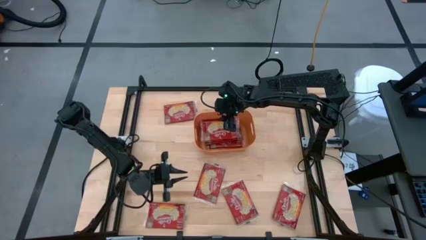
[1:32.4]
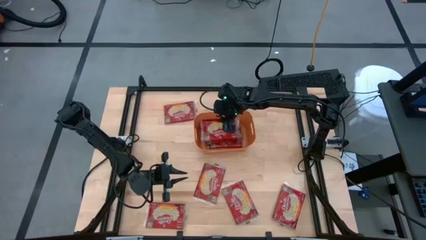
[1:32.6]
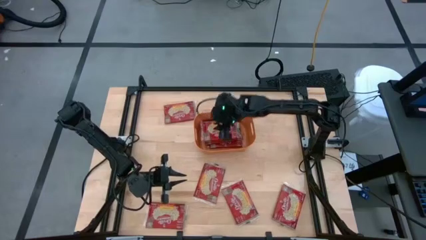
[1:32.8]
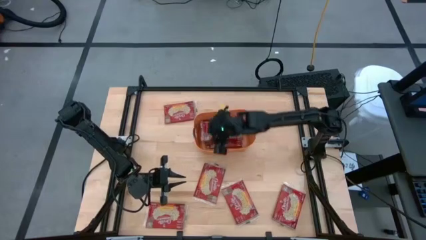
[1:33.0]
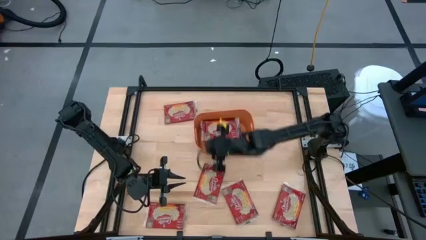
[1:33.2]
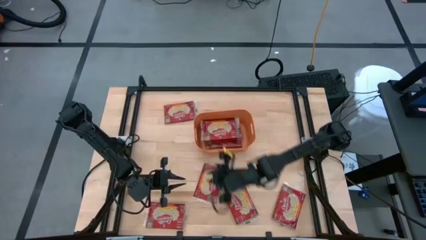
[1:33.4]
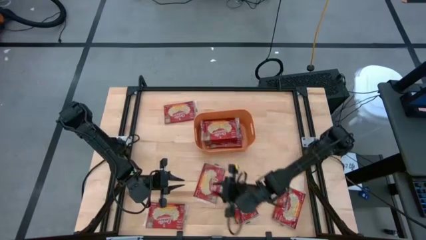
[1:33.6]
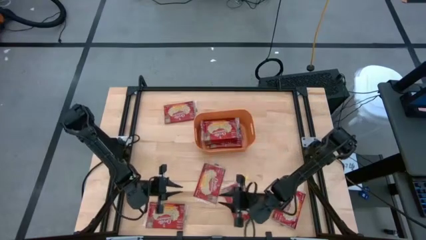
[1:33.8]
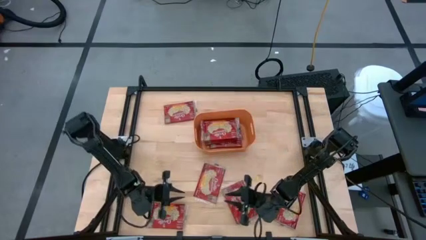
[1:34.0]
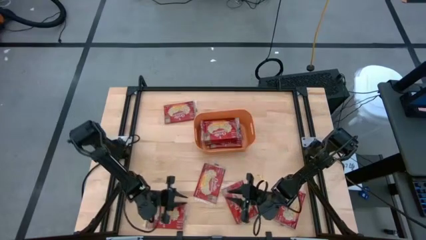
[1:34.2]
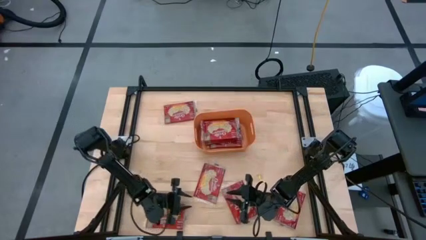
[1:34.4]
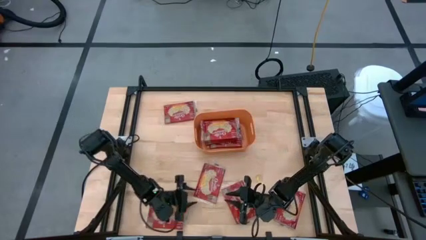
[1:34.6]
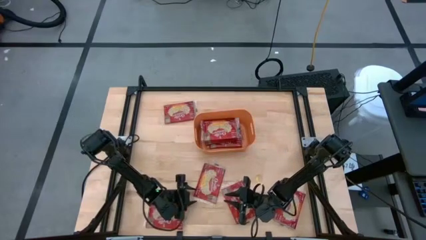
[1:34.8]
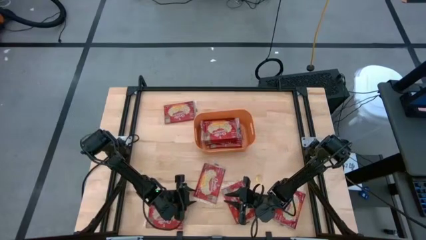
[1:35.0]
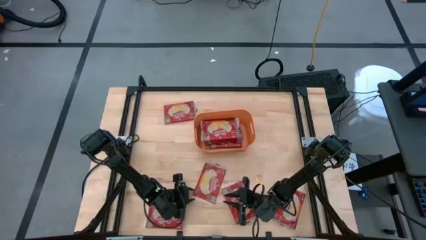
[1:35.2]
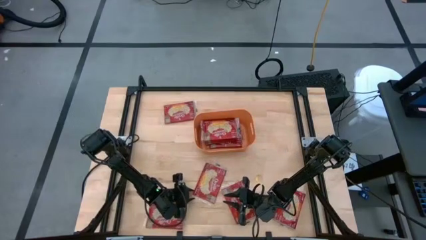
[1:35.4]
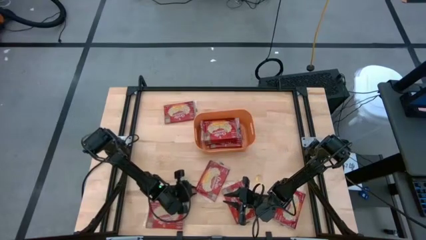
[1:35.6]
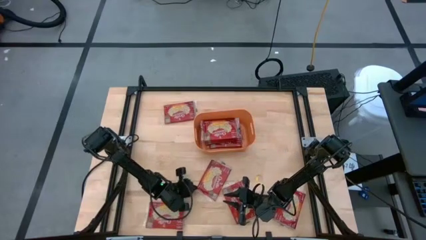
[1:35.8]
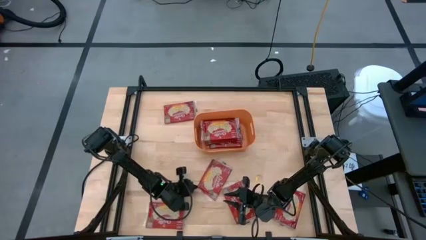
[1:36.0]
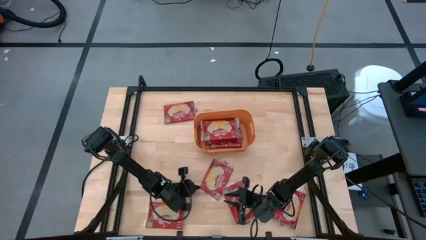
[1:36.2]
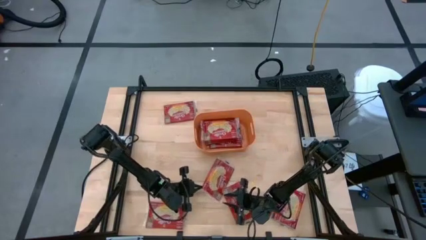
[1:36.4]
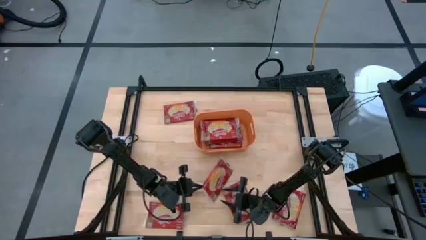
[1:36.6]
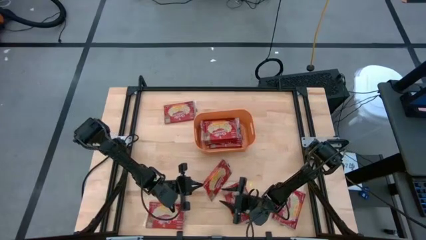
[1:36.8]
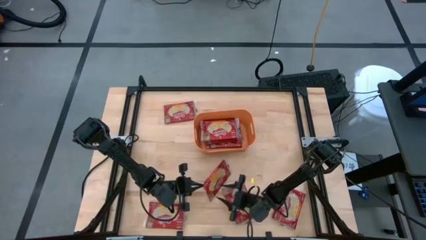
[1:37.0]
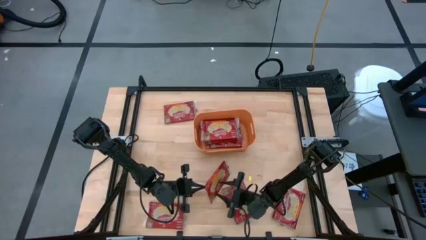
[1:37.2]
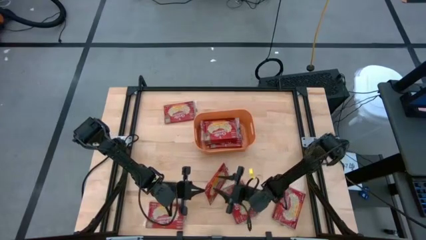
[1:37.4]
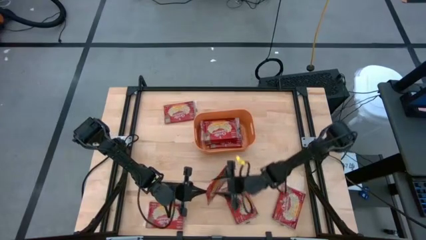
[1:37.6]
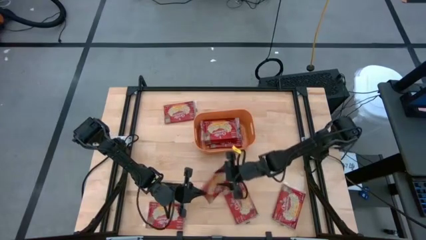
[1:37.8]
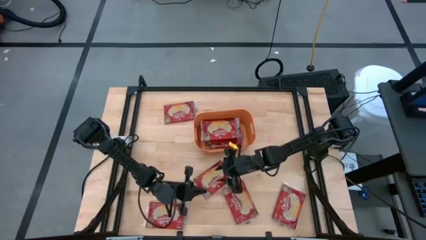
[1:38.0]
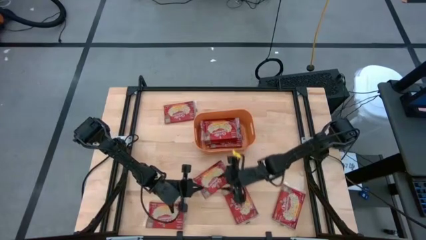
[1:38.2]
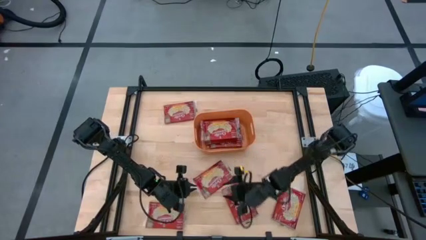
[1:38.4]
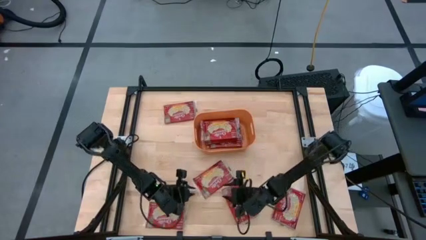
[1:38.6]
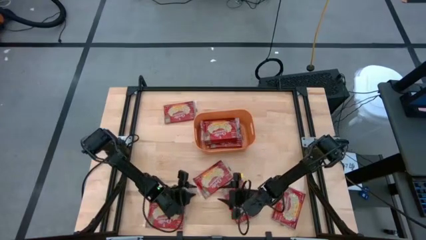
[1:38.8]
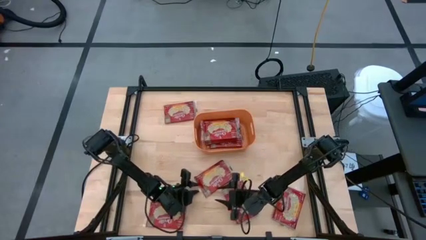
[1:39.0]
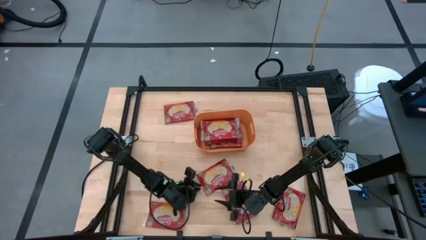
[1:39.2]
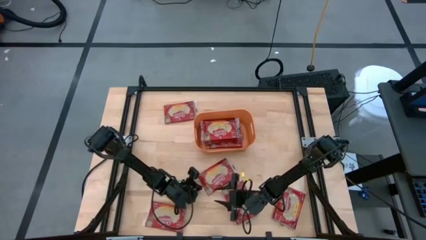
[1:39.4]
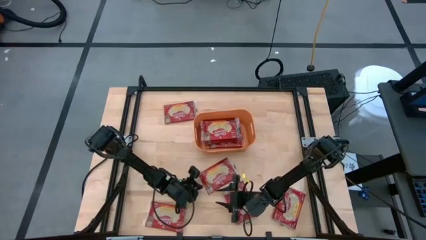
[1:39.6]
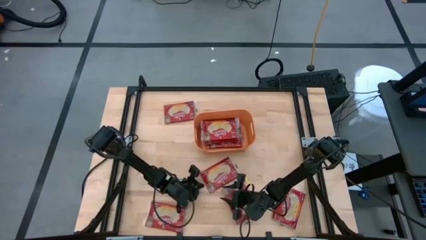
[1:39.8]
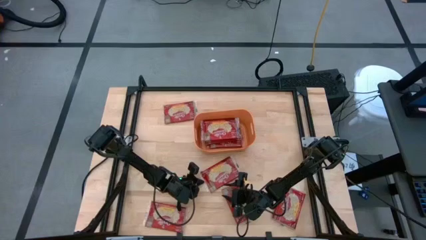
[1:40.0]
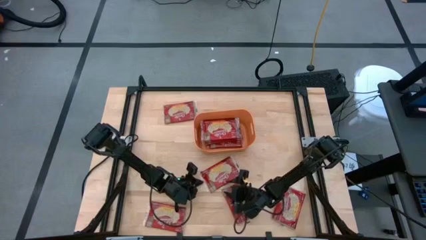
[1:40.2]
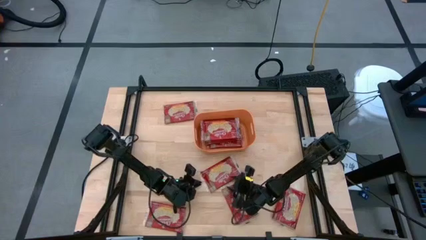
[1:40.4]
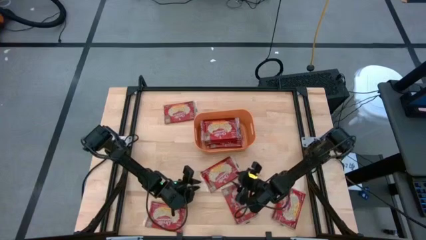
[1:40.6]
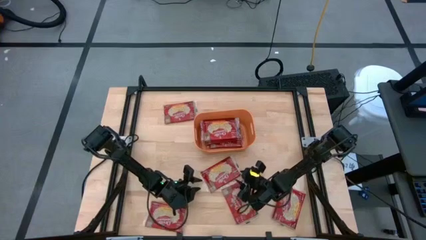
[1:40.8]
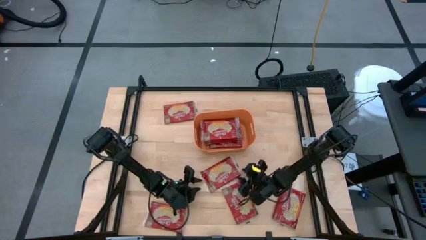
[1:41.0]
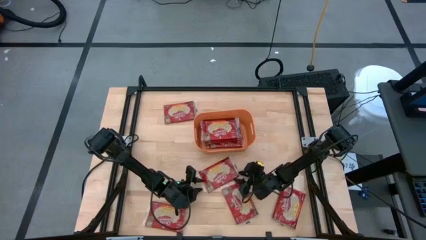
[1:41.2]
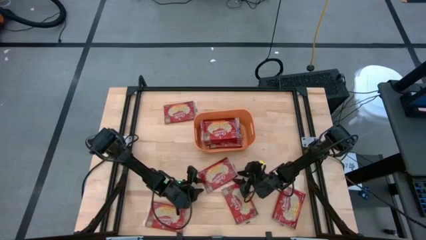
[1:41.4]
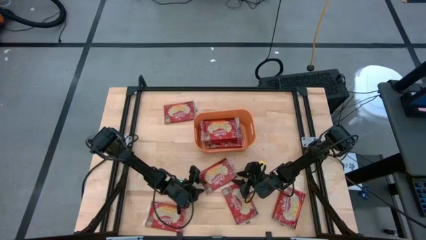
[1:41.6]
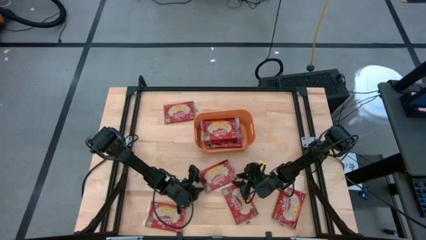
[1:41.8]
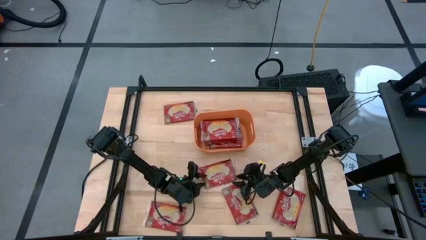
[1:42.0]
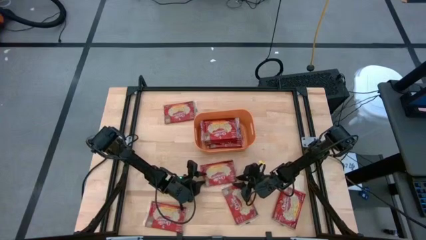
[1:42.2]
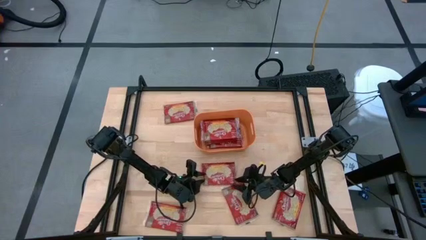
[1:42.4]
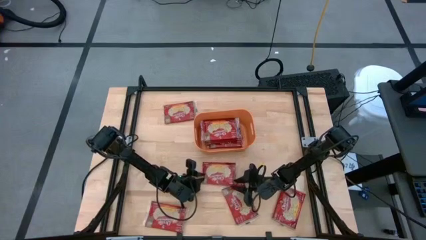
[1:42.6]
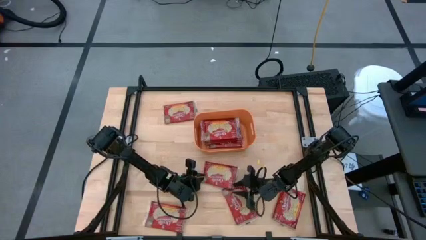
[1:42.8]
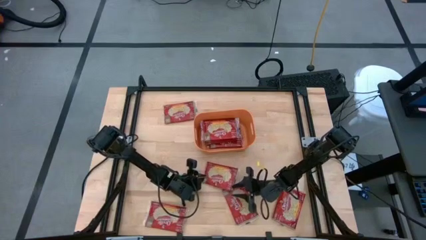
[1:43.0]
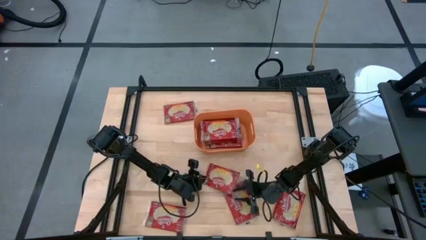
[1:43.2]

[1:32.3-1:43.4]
Task: Sort popcorn bags into baskets
Put the red popcorn bag into the orange bin

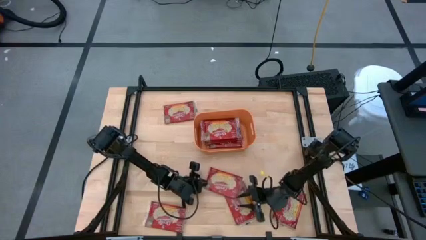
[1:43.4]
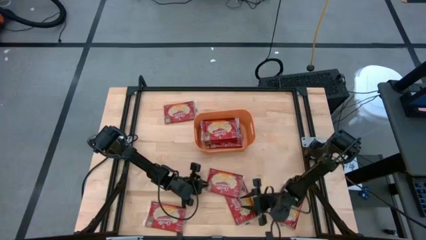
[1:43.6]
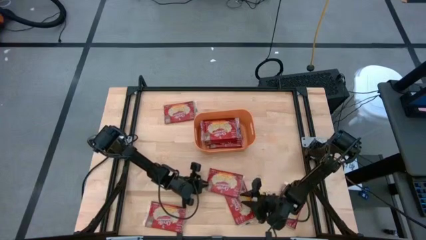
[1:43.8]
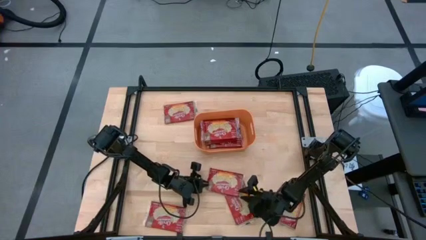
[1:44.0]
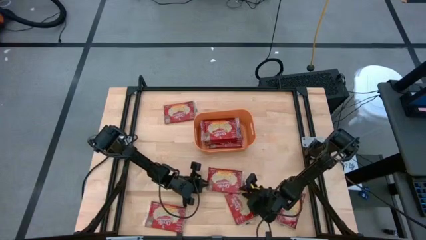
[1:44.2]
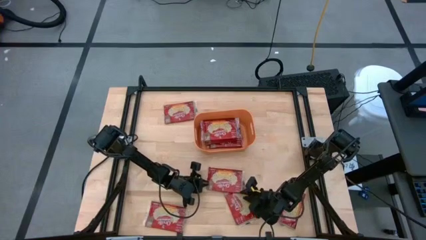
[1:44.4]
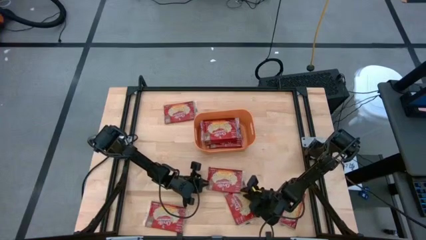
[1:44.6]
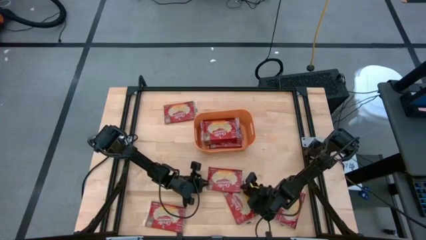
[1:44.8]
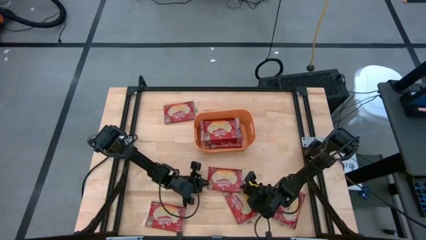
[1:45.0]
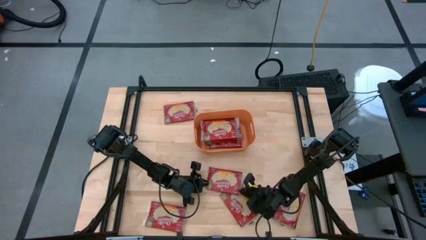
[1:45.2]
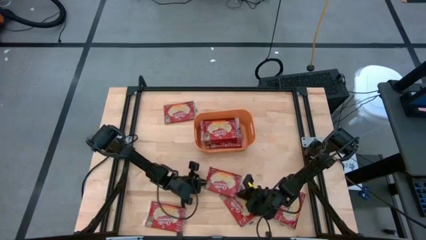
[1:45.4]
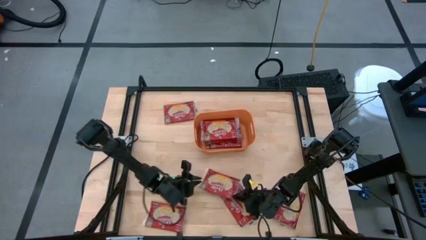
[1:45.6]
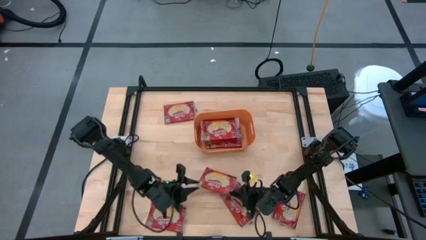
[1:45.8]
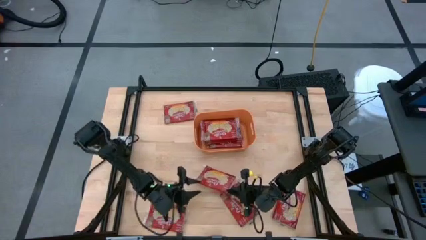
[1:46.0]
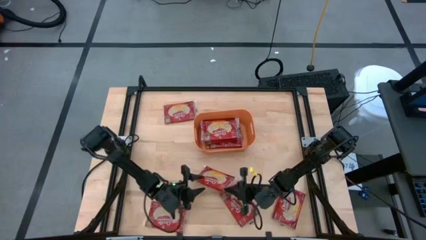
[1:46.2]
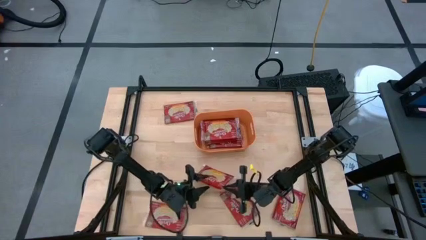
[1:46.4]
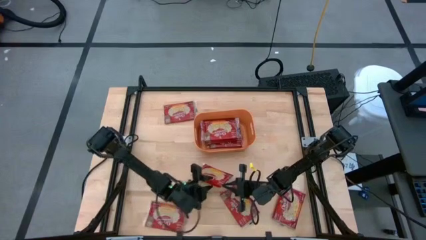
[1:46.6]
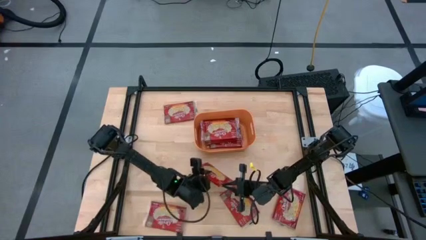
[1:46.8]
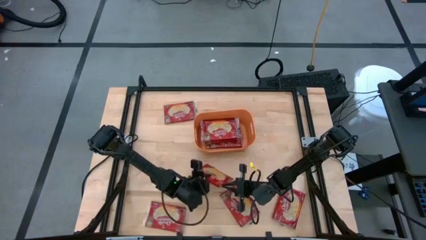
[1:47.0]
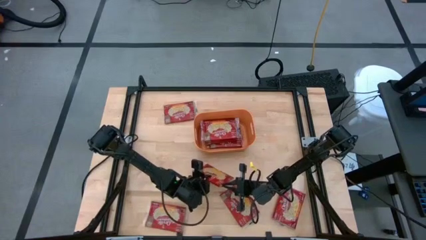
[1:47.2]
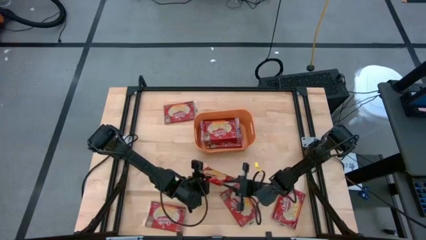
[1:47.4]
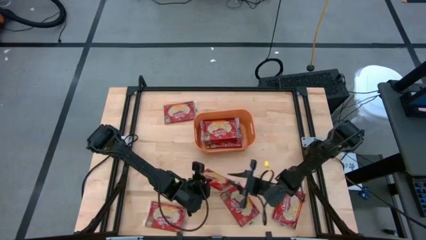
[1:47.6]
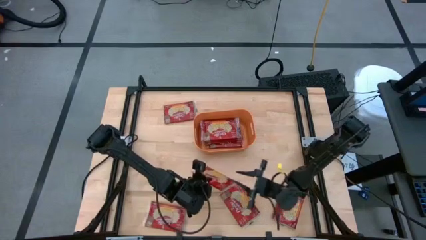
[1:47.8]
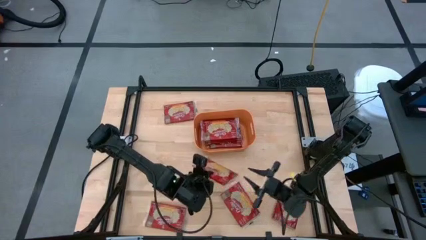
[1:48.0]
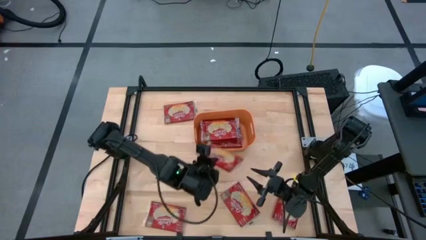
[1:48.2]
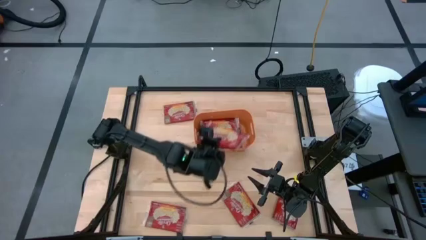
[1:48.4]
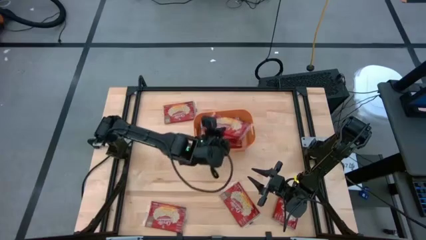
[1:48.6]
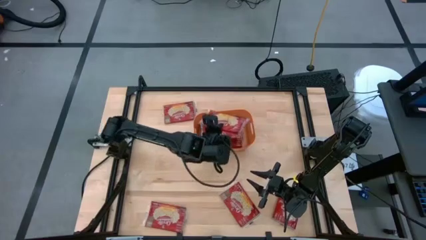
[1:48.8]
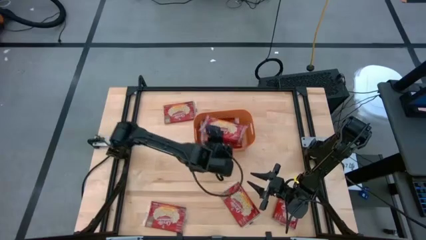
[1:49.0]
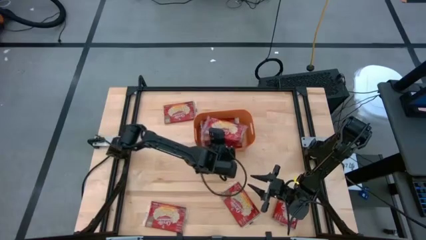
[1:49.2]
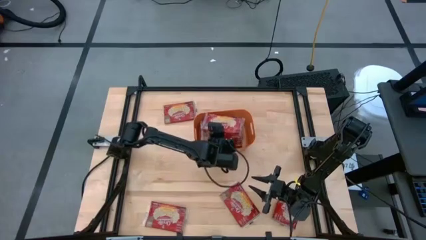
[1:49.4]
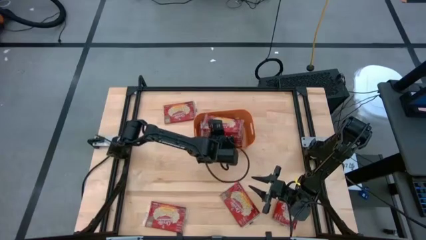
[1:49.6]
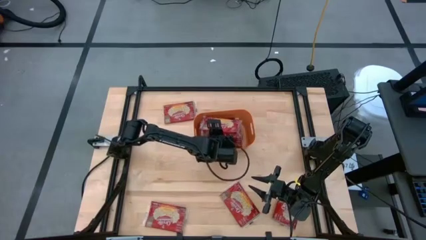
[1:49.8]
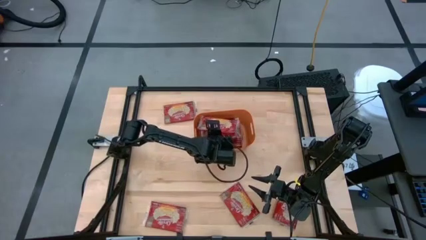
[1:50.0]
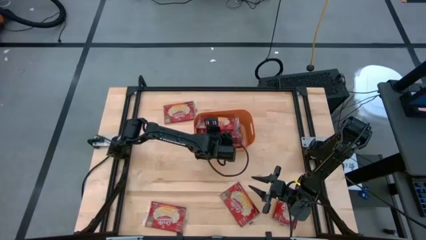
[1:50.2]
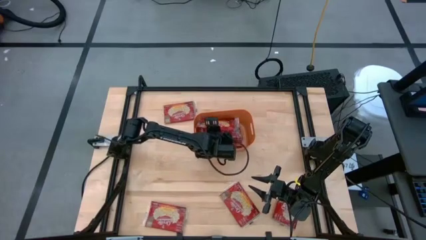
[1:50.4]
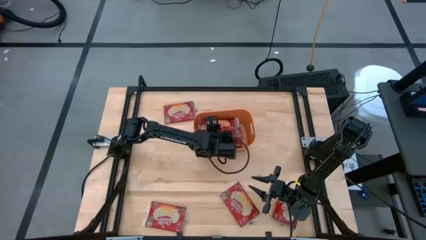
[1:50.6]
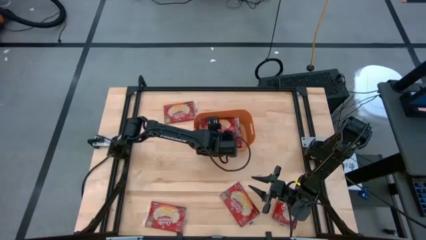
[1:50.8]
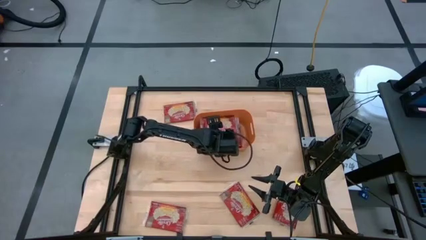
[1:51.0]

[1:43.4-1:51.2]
Put the red popcorn into the orange bin
